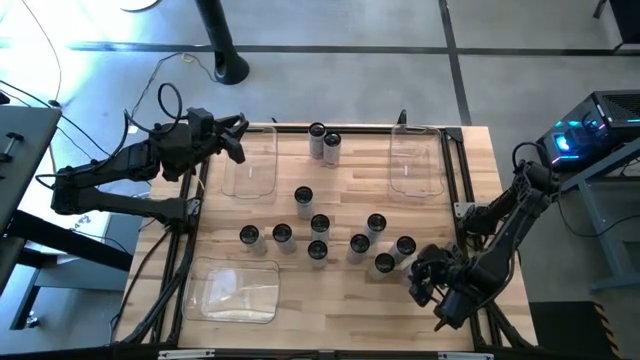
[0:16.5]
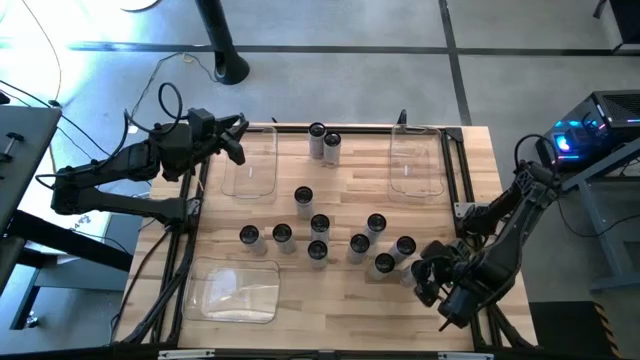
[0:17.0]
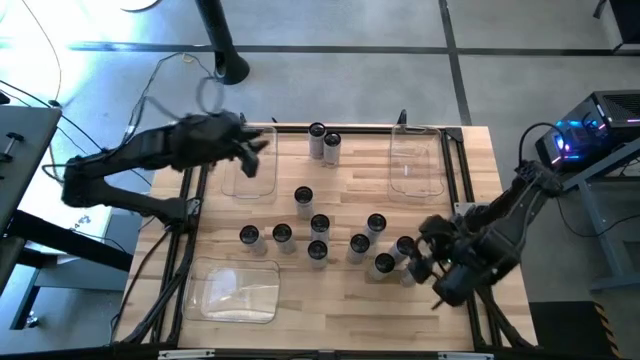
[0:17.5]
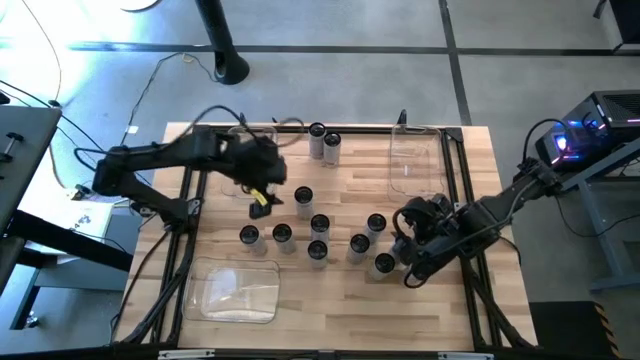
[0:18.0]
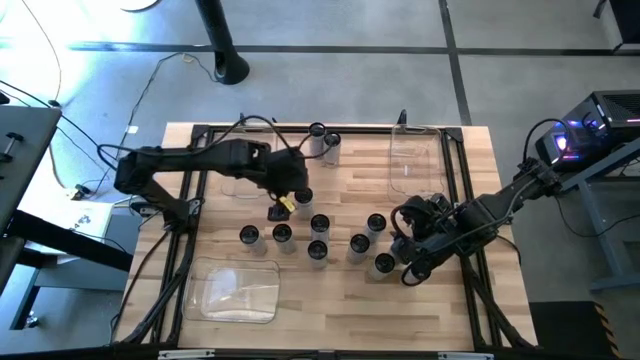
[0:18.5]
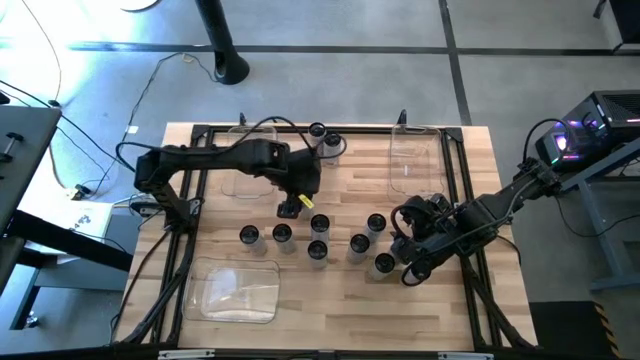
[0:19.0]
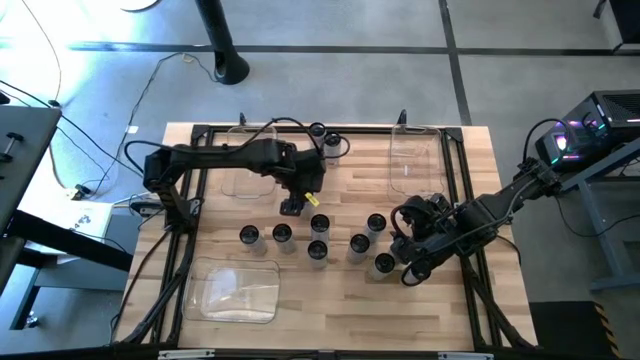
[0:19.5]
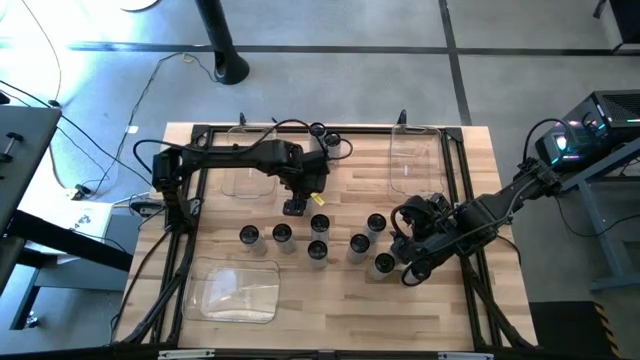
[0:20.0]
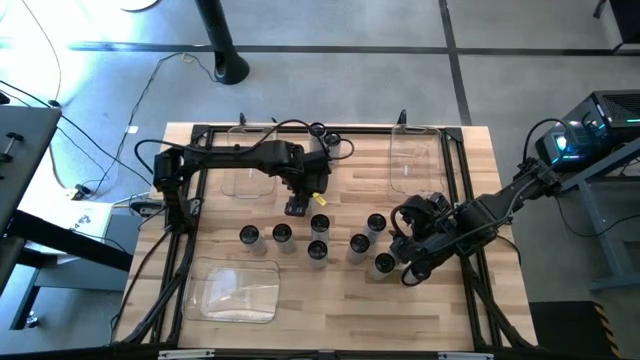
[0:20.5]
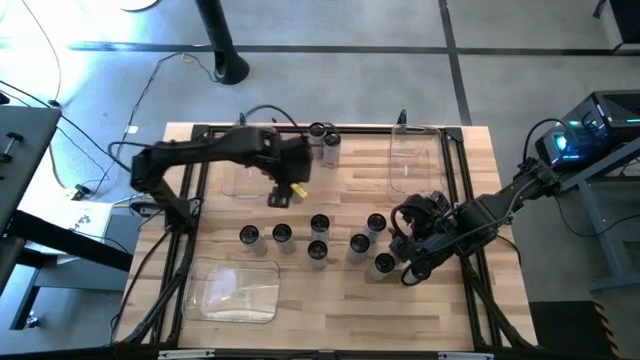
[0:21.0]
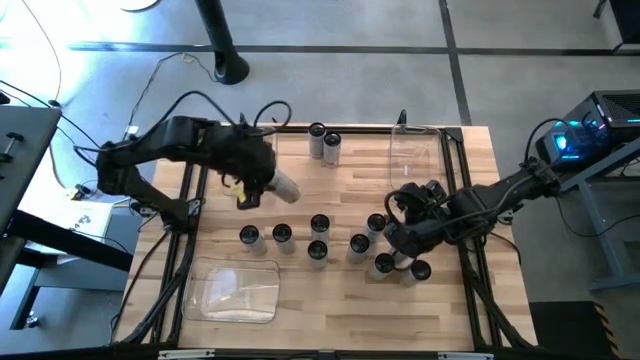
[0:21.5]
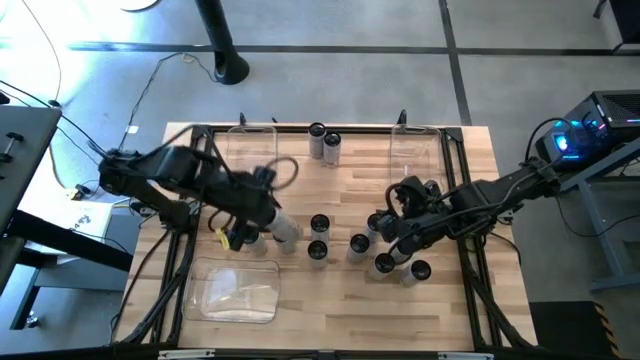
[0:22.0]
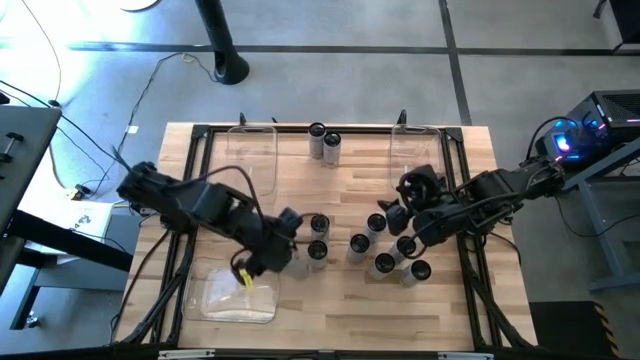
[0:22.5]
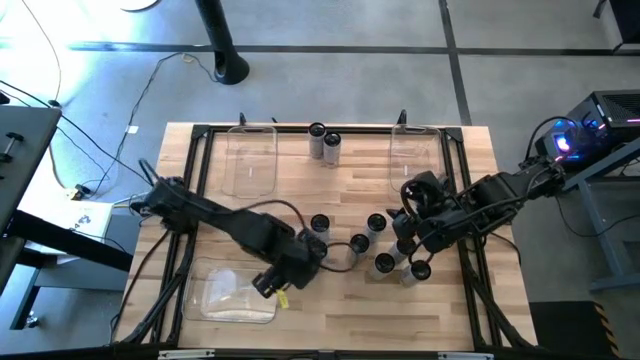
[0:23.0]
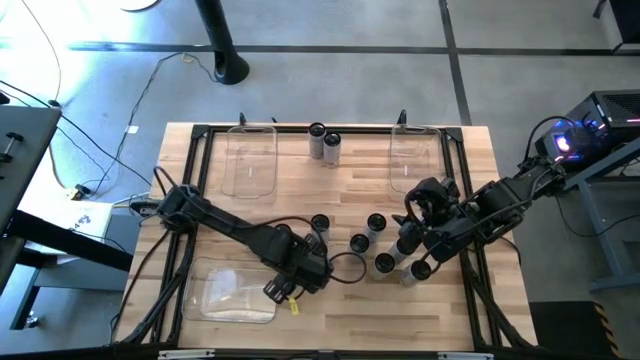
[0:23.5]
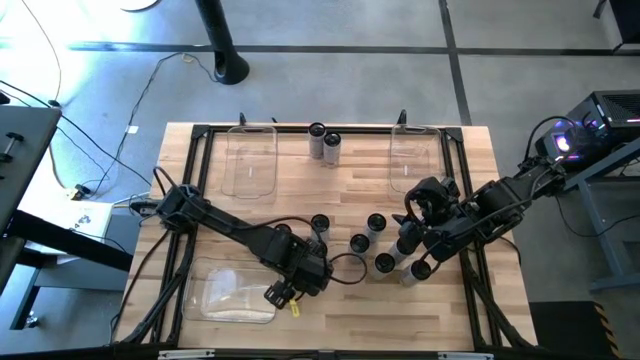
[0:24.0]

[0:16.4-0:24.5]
Task: Sort soda cans
Move the white-yellow soda can to the bottom left of the table

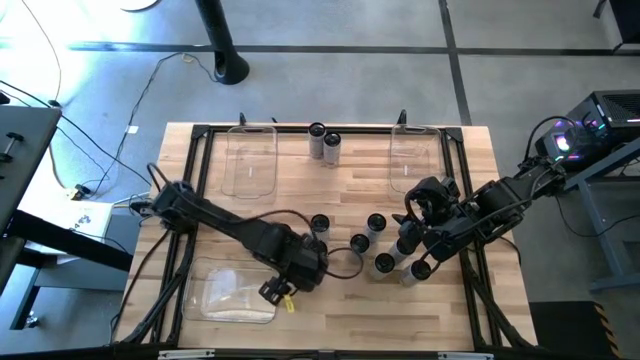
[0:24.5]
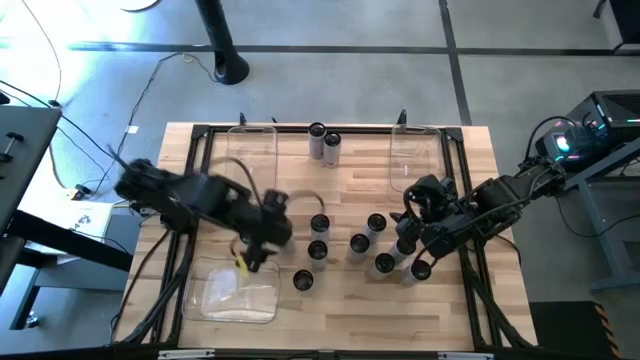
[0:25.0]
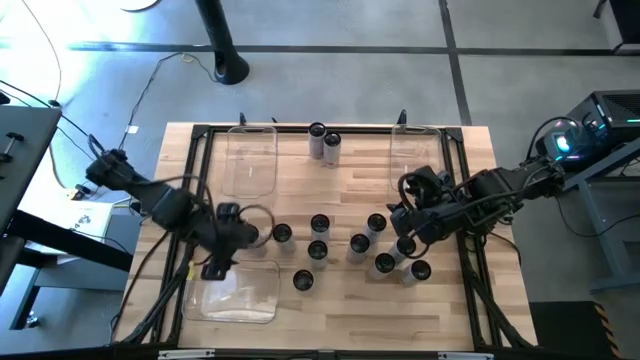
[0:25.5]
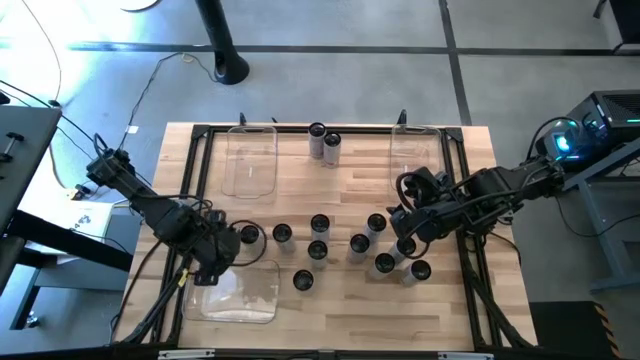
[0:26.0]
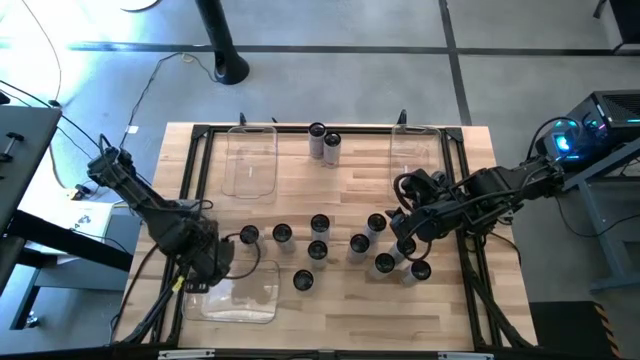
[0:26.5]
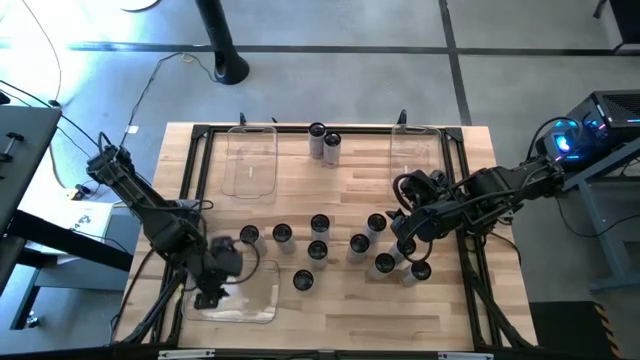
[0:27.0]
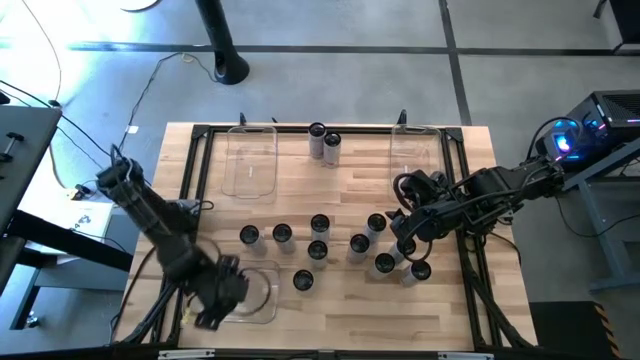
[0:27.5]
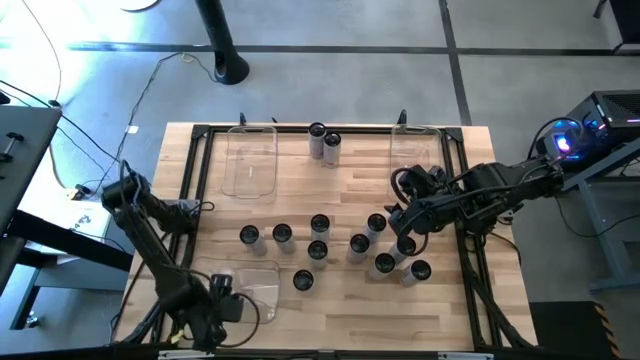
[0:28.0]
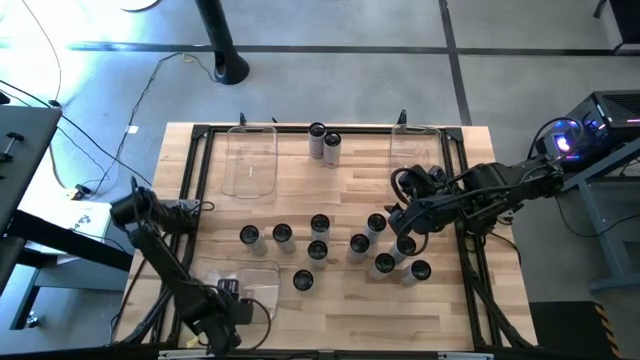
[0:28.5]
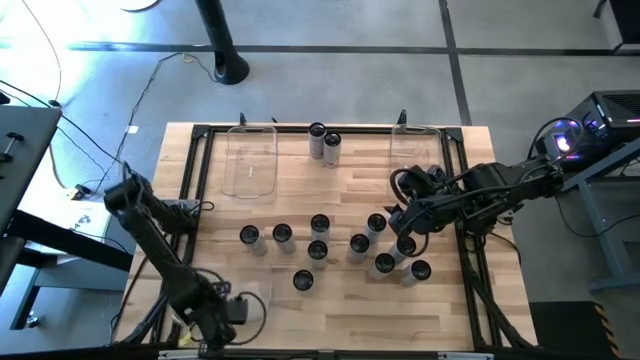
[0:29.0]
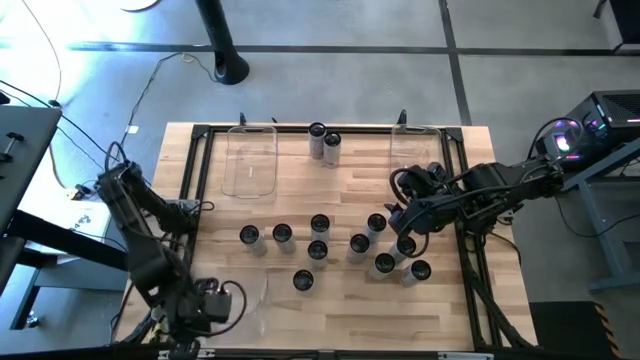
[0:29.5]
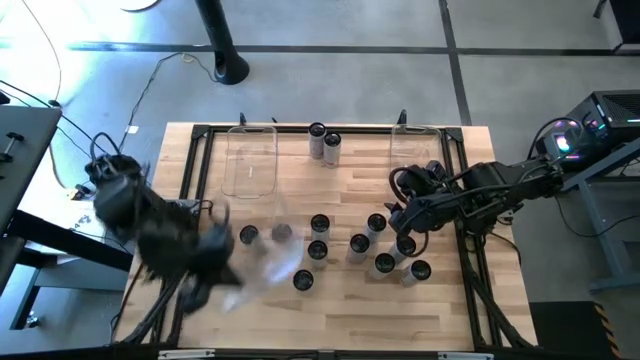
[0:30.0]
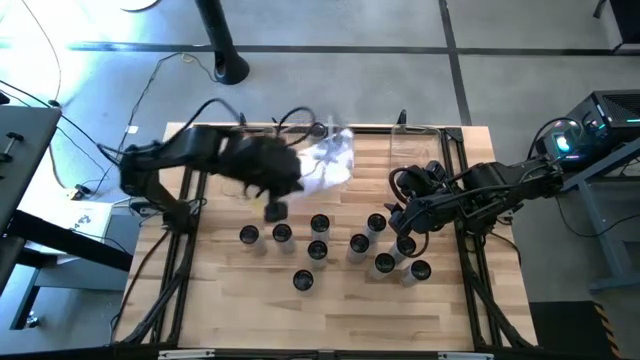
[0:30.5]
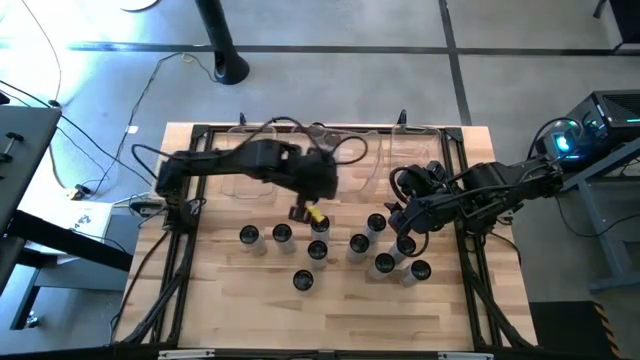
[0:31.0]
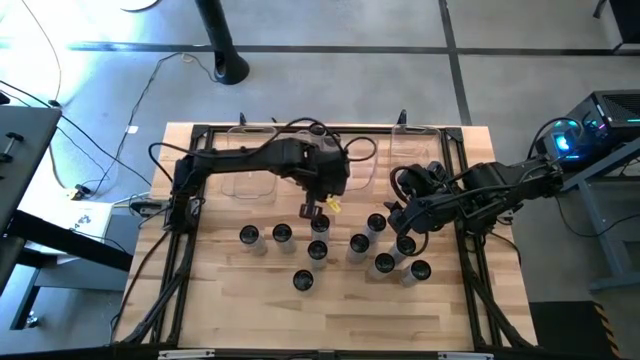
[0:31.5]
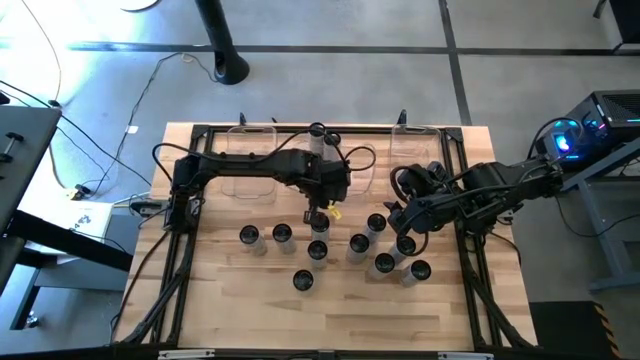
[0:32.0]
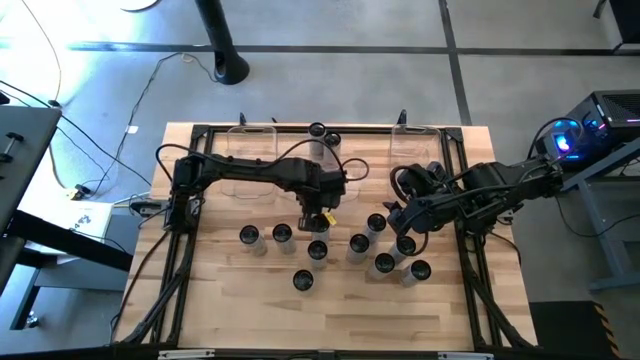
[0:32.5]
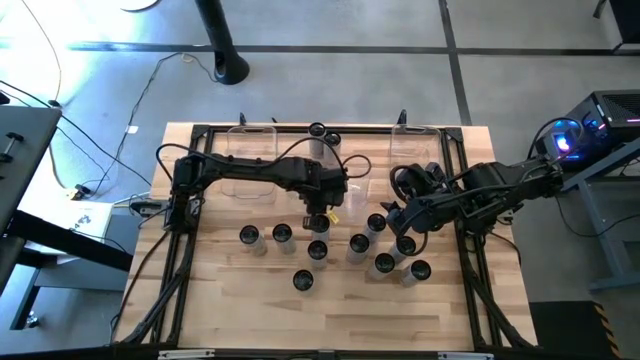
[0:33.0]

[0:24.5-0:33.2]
Move the bottom transparent bin to the top center of the table

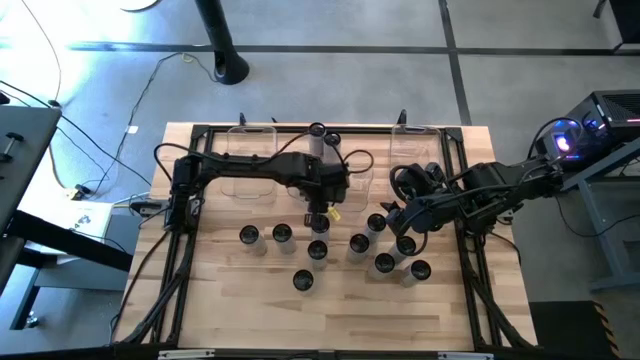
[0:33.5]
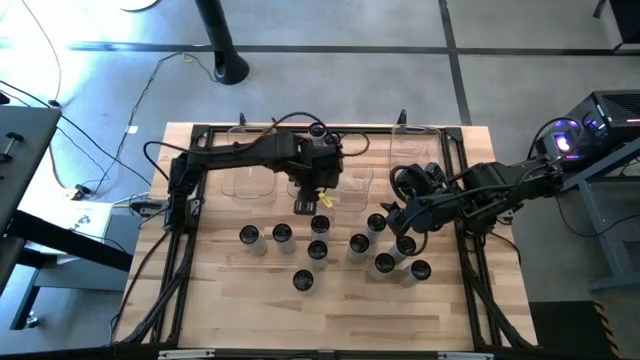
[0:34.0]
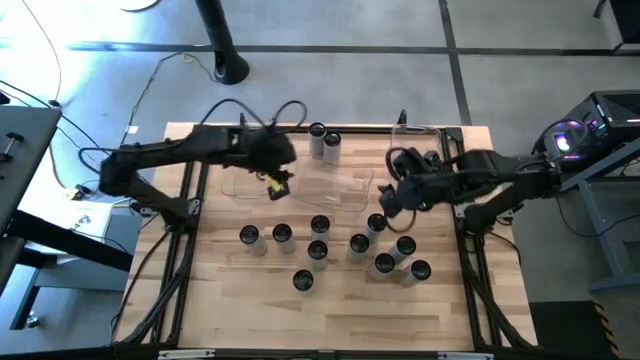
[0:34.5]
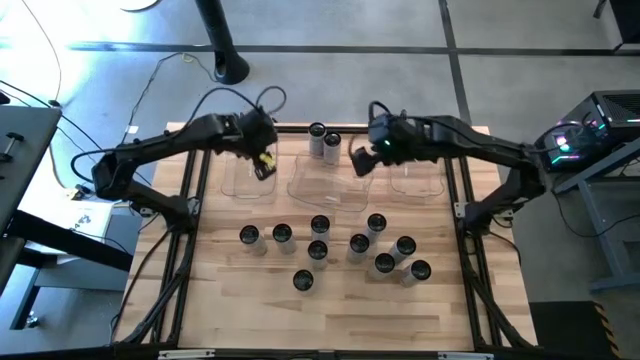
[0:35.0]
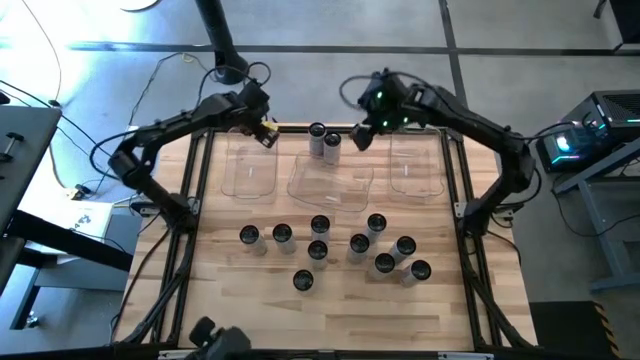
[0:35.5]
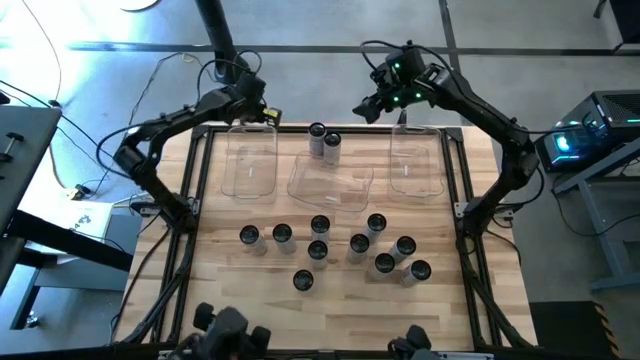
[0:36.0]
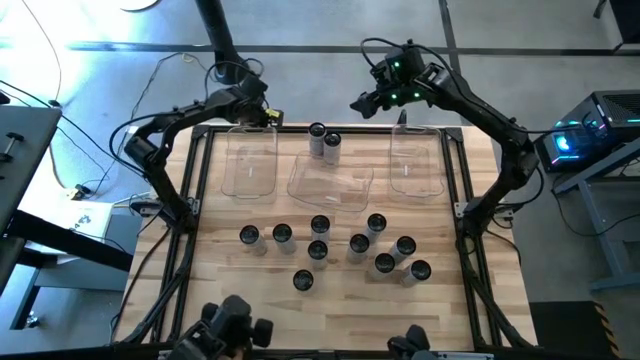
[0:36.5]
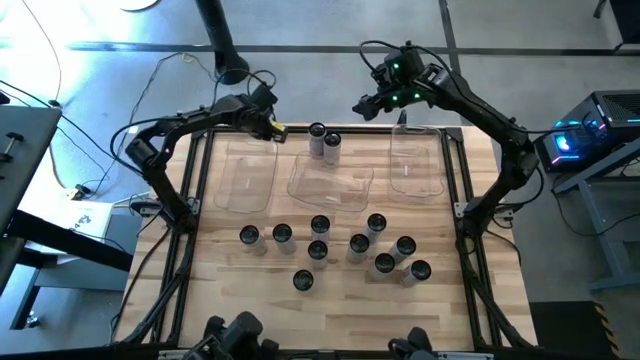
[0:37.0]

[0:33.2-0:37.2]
Adjust the top left transparent bin
